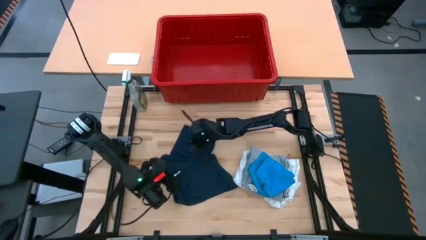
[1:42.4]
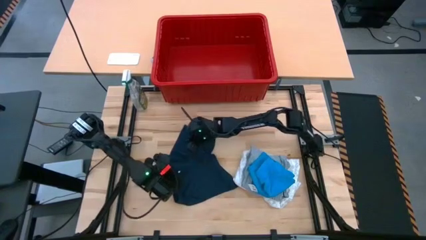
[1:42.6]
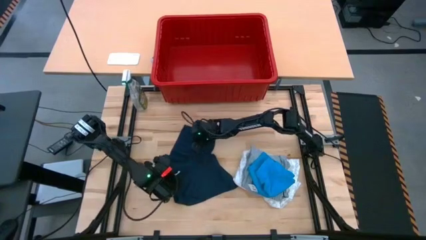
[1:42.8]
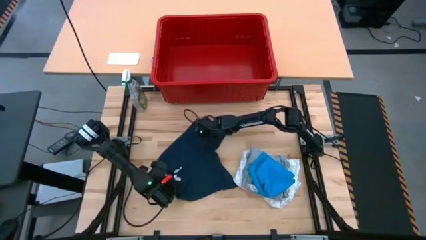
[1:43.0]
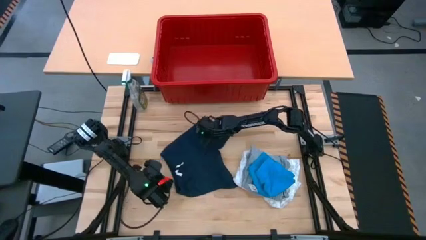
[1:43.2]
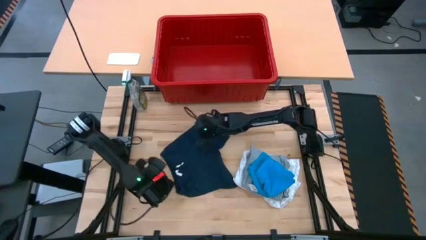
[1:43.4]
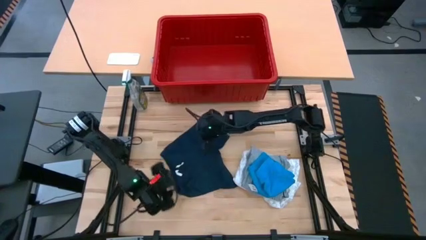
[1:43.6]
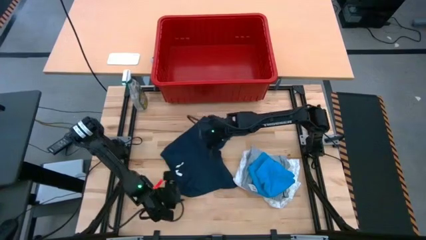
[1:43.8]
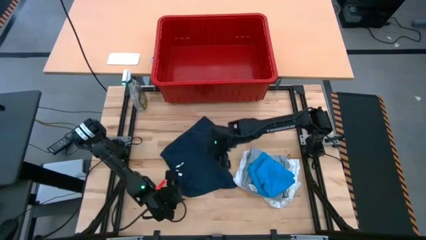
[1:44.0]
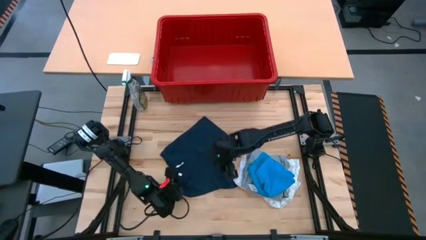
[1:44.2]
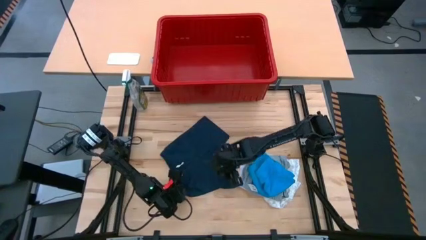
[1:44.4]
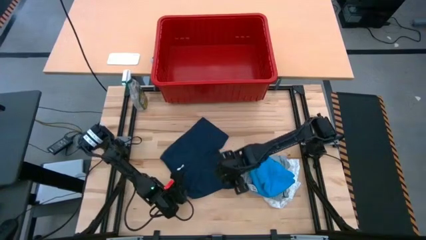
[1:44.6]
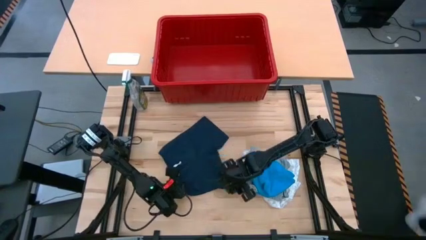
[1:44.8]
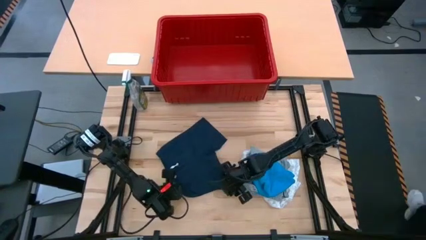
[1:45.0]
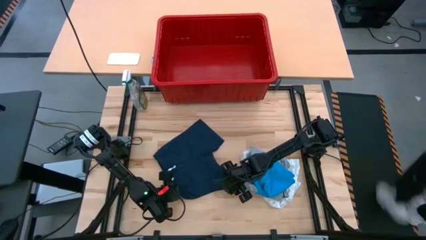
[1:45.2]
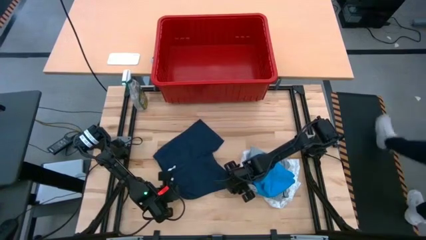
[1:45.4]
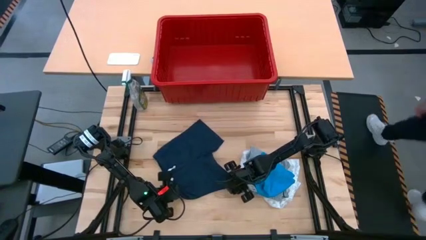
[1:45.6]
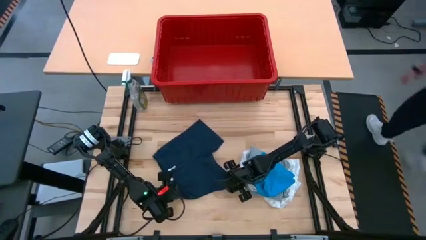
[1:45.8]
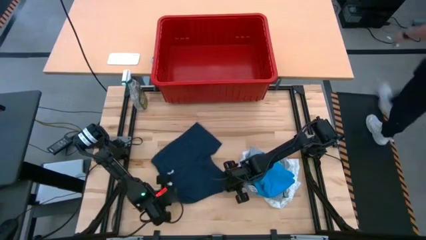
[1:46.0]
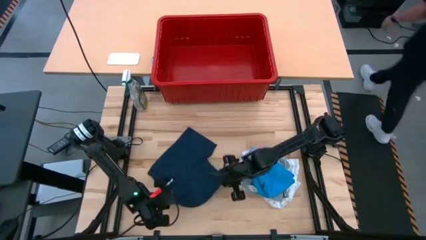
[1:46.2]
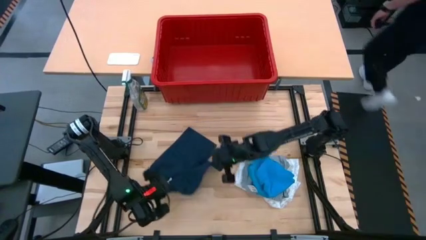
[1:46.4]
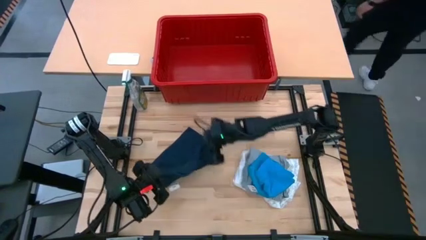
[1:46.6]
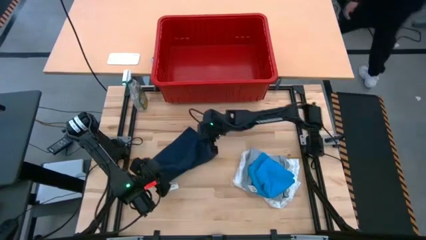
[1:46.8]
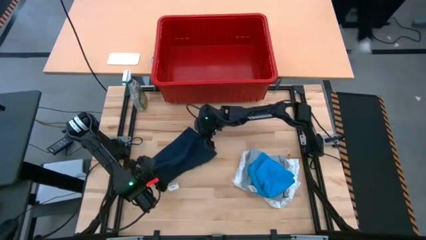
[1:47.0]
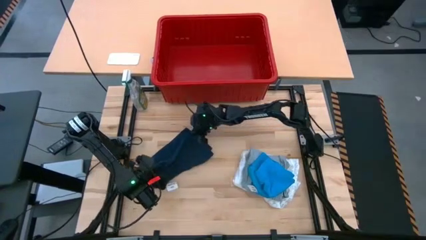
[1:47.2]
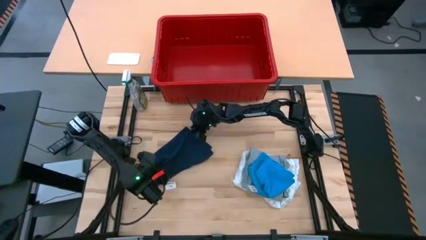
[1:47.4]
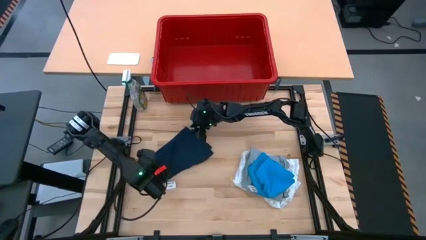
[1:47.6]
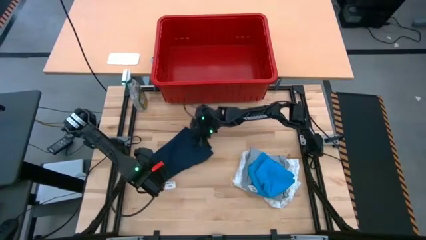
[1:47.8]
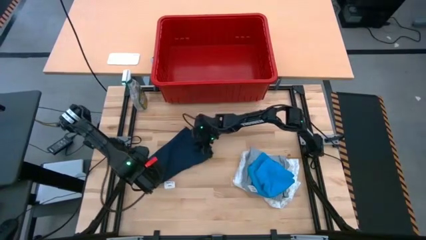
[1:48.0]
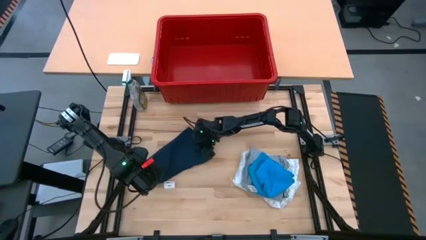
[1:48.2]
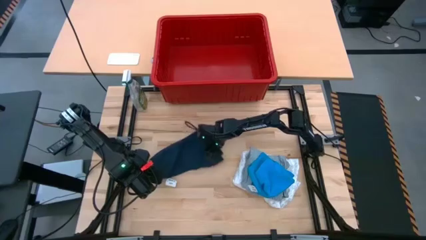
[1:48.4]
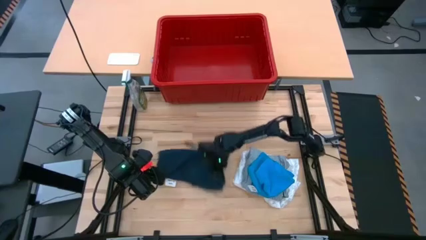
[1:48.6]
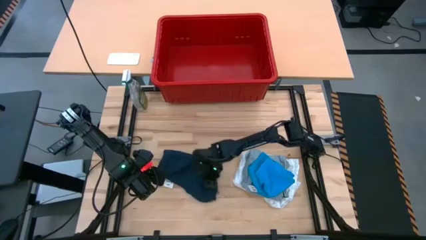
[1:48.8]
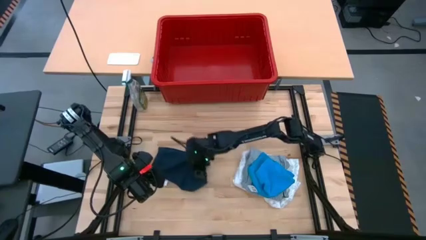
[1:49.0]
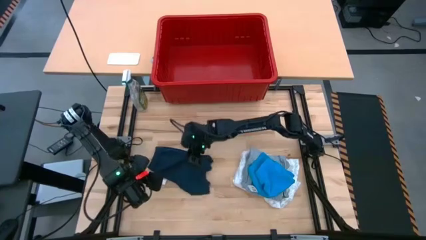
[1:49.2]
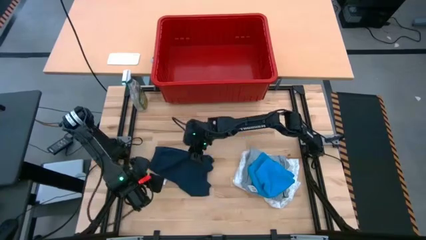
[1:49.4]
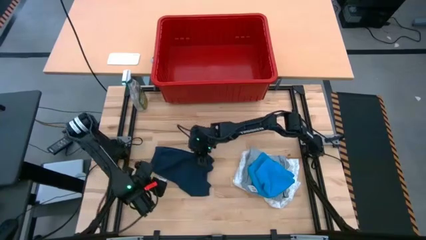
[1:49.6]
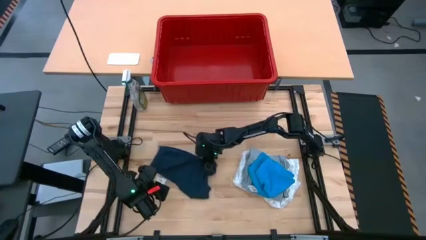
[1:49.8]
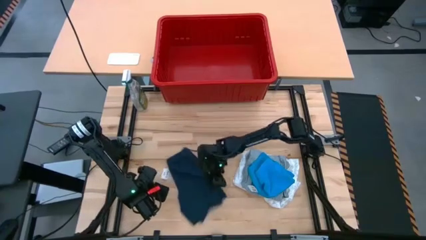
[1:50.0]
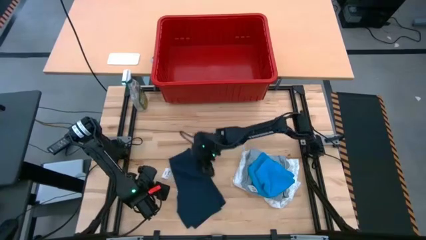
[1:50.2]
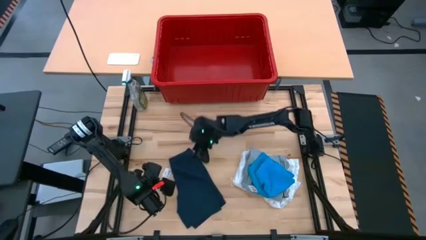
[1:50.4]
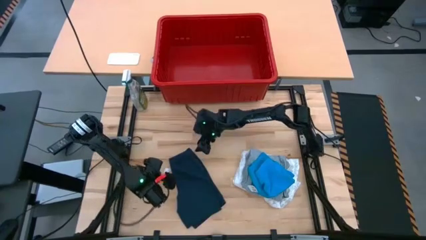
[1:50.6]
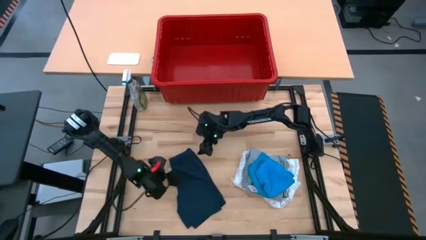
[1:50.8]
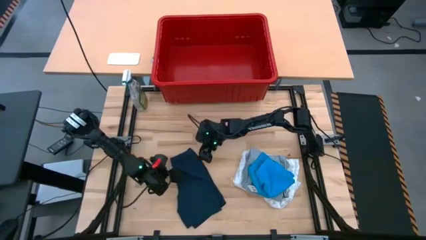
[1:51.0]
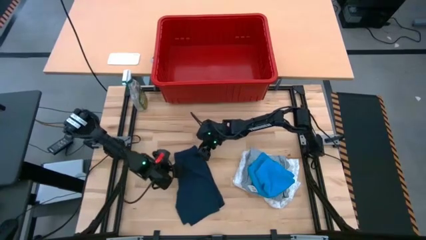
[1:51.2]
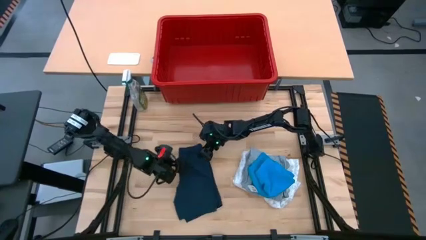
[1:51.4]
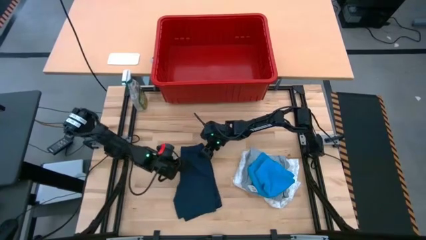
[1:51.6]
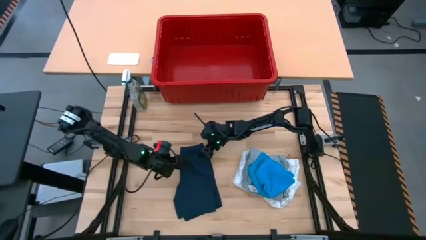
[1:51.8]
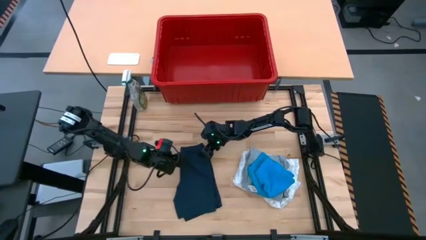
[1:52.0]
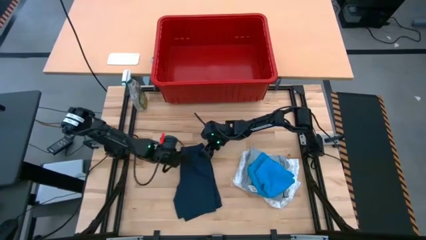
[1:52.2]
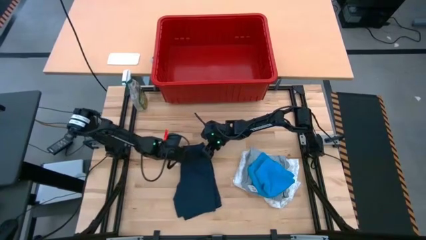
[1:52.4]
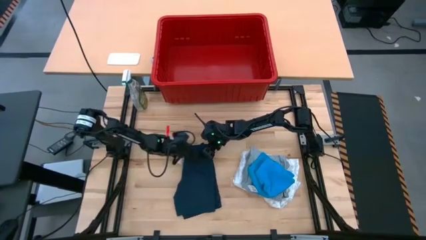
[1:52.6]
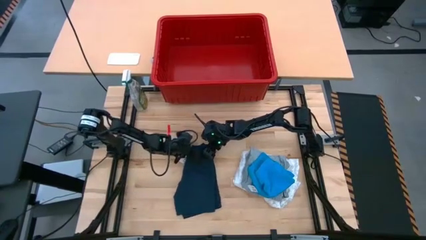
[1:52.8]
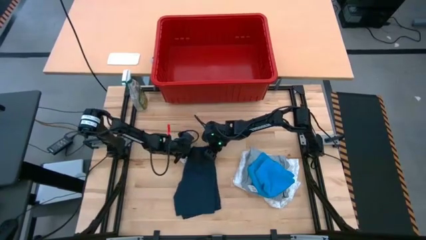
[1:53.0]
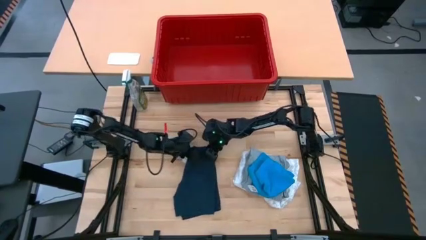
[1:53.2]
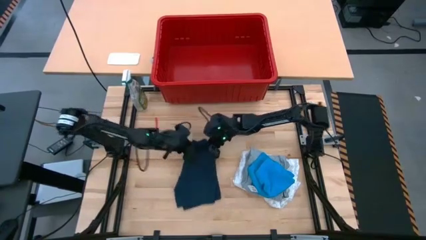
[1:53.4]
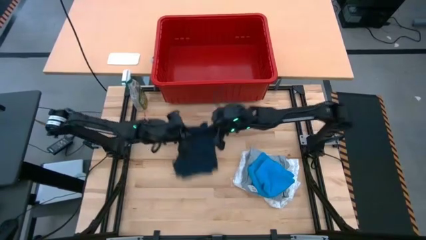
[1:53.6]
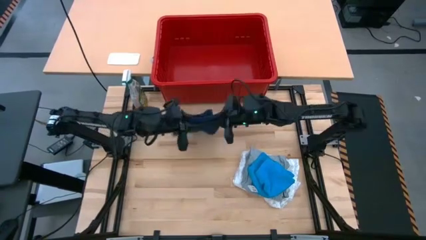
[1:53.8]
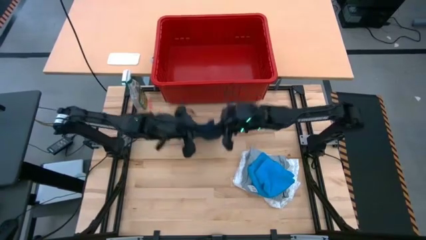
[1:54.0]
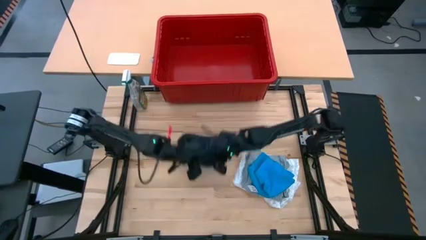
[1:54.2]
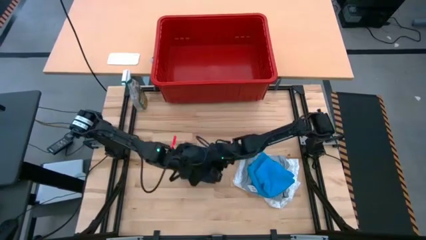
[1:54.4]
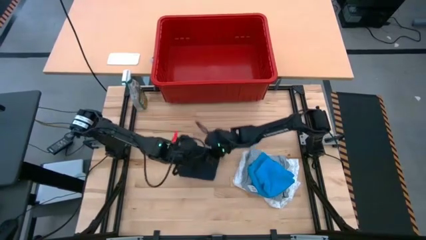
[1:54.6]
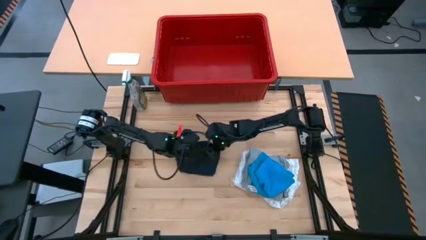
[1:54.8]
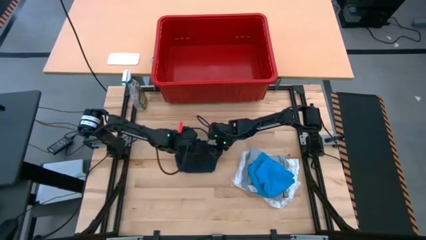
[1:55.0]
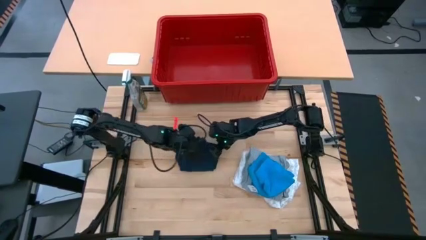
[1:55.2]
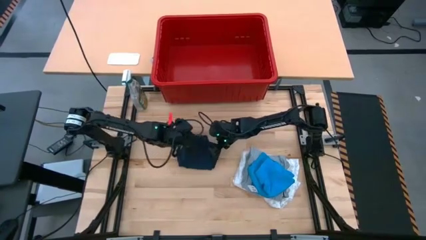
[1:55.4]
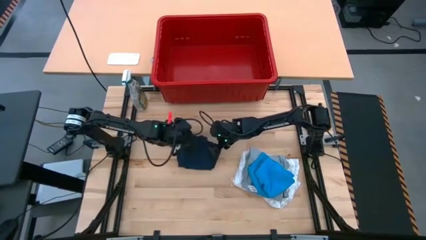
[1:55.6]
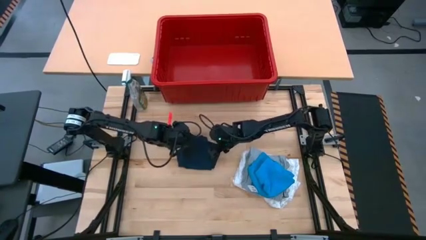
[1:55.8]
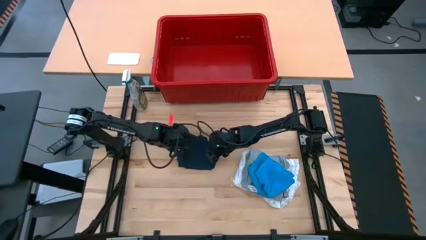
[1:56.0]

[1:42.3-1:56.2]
Task: Fold laundry
Fold the blue shorts on the table

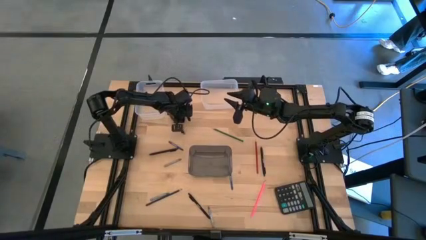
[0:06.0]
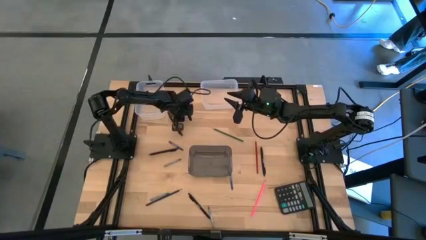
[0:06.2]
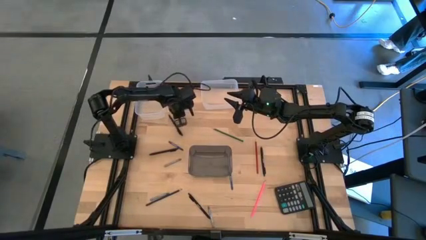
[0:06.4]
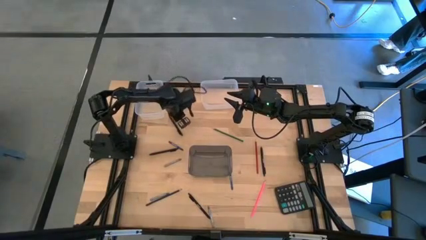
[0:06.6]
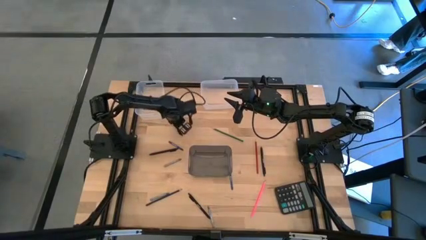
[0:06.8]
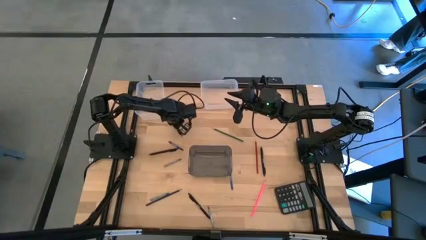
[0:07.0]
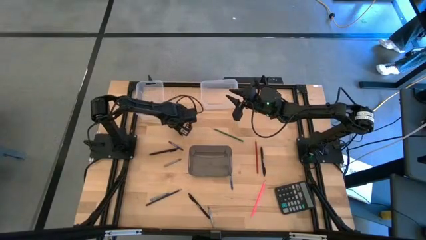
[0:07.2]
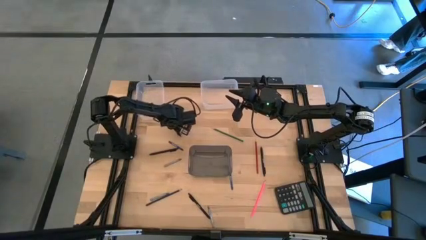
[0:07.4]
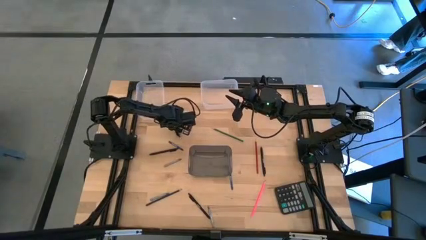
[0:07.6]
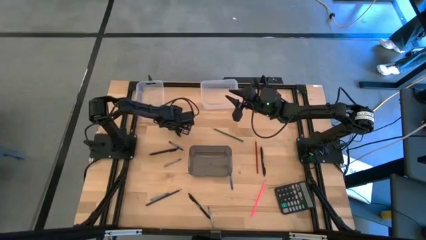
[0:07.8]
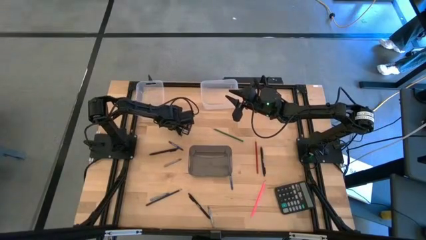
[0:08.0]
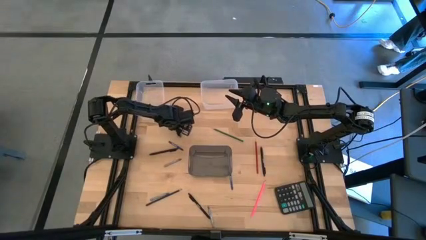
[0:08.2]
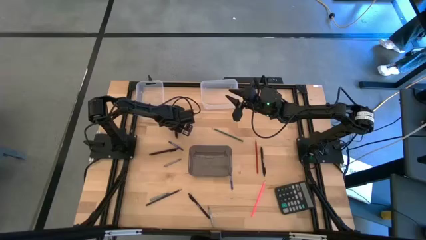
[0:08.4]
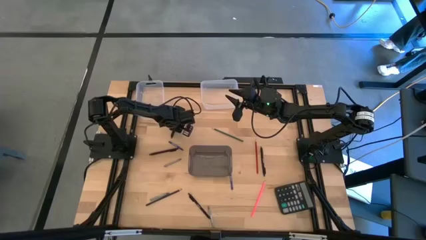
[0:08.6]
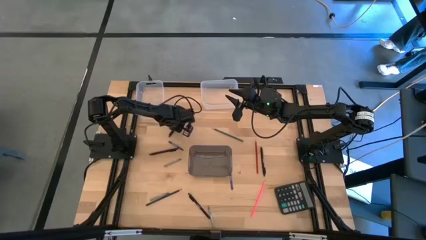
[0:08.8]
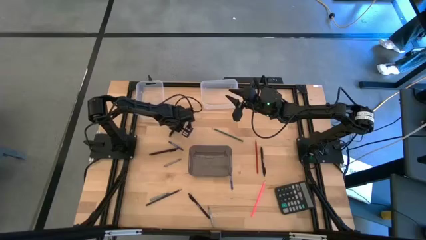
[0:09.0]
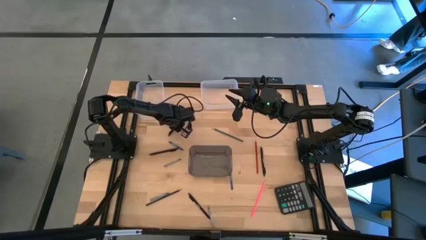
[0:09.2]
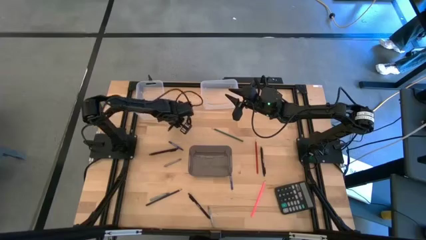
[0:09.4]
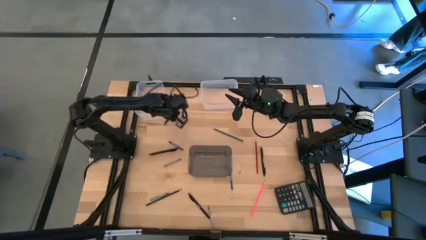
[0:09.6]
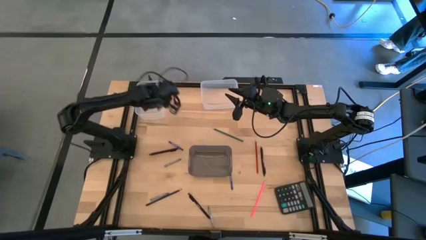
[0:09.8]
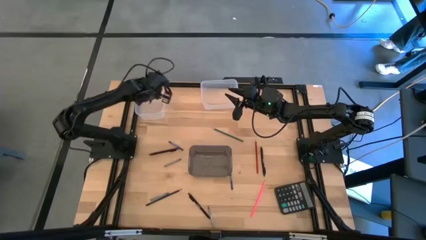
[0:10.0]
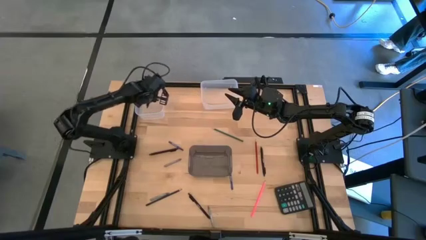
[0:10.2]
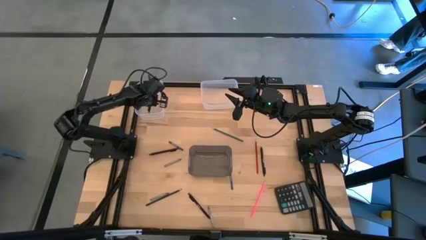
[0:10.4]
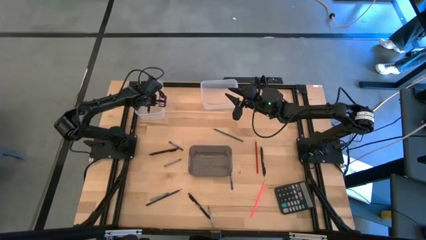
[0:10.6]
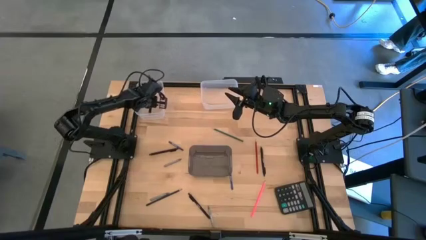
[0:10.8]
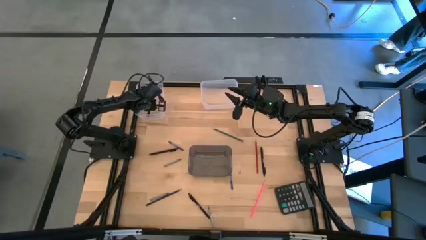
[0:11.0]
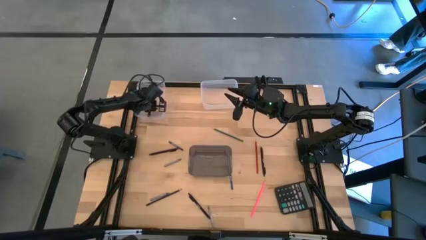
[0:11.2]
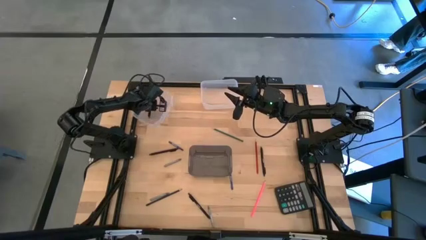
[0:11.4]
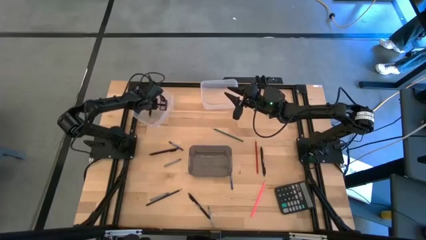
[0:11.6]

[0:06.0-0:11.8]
Task: Sort crayons/erasers/pens/pencils in bins
Put the black pen into the left transparent bin
